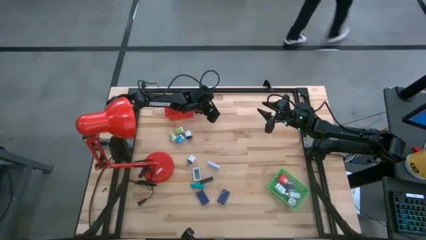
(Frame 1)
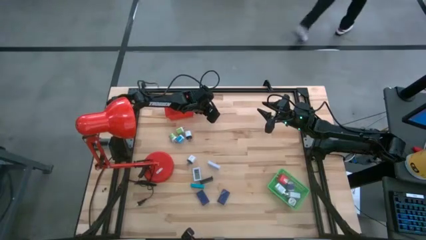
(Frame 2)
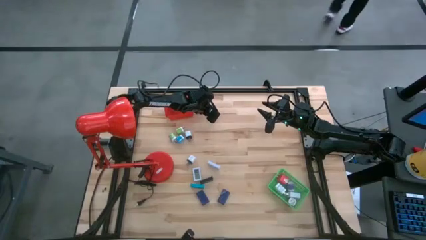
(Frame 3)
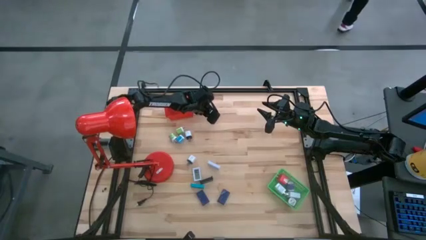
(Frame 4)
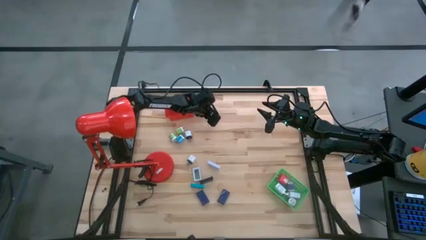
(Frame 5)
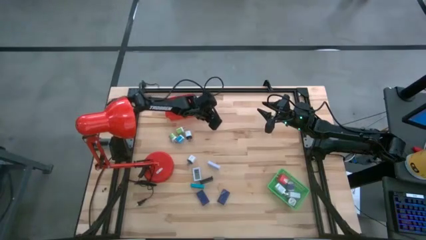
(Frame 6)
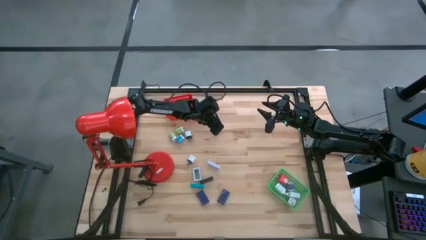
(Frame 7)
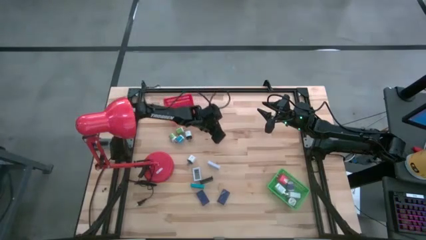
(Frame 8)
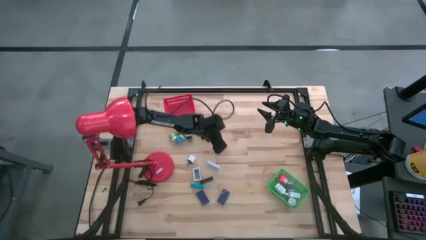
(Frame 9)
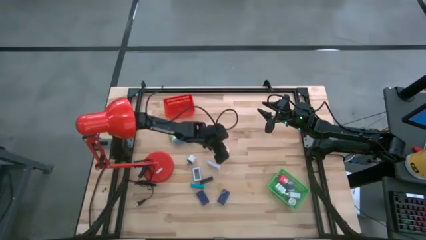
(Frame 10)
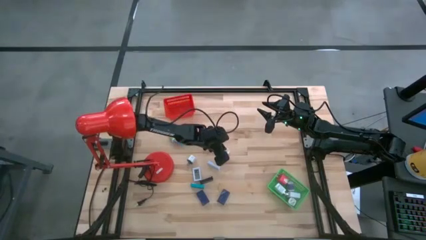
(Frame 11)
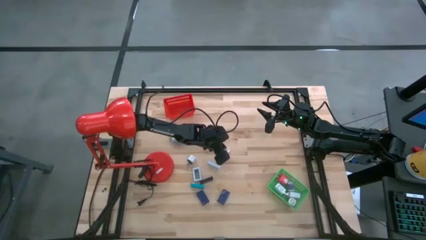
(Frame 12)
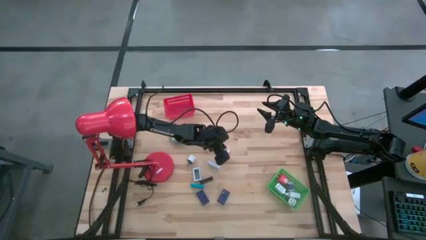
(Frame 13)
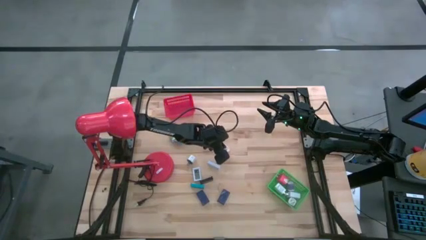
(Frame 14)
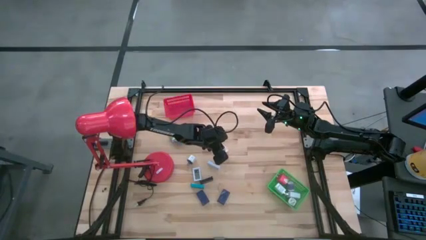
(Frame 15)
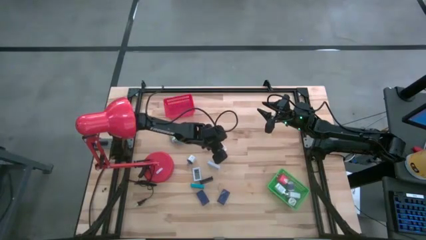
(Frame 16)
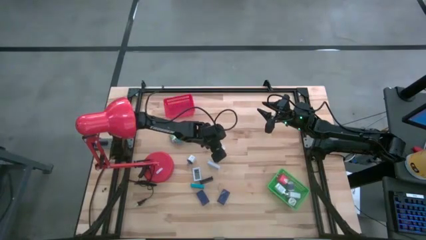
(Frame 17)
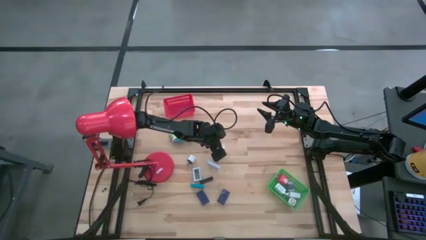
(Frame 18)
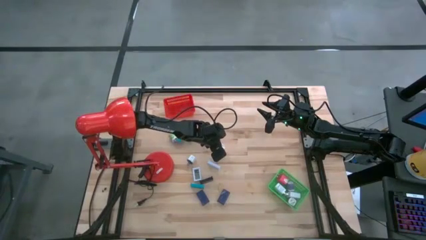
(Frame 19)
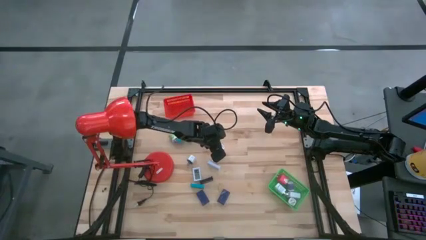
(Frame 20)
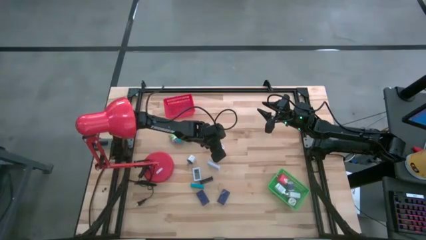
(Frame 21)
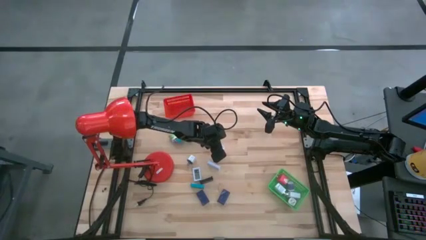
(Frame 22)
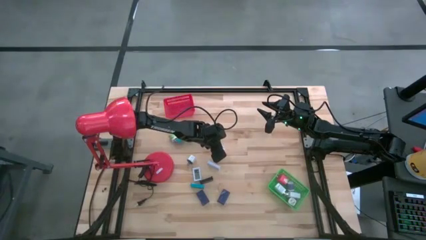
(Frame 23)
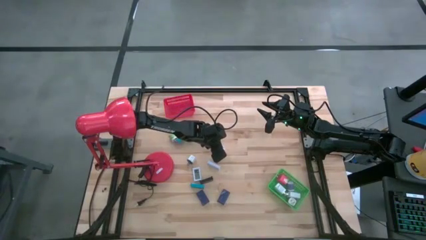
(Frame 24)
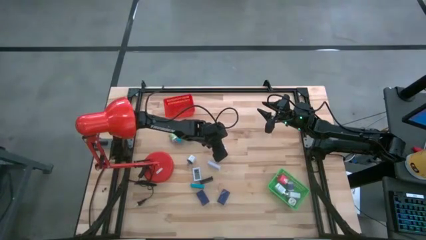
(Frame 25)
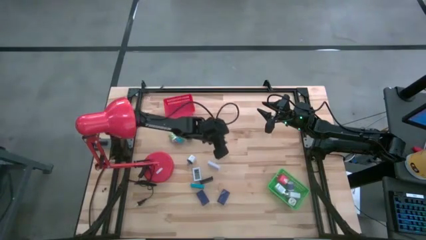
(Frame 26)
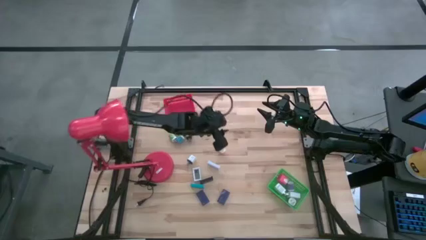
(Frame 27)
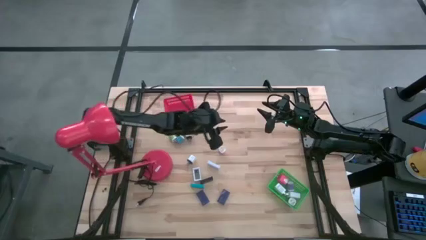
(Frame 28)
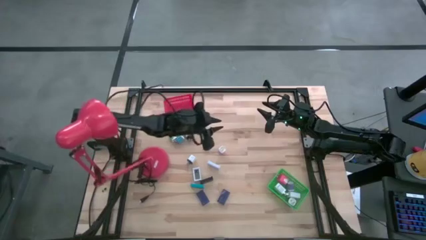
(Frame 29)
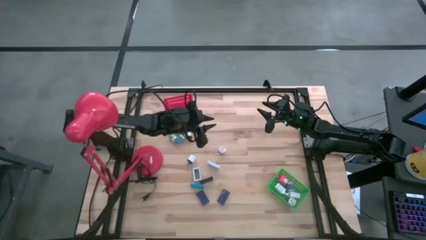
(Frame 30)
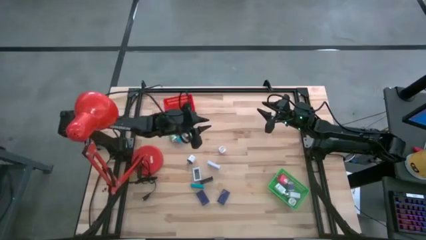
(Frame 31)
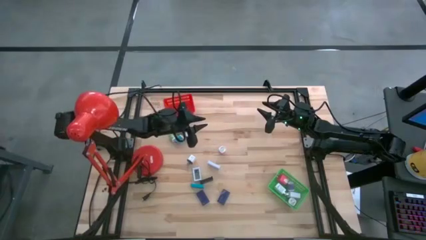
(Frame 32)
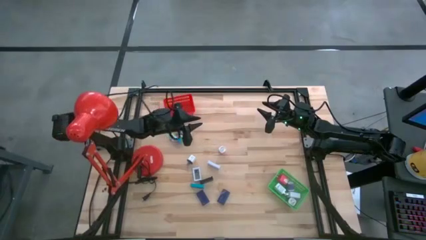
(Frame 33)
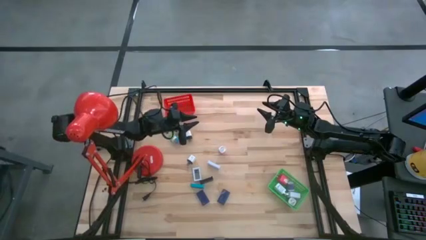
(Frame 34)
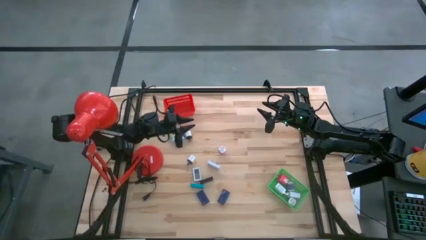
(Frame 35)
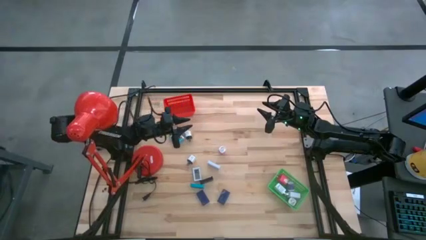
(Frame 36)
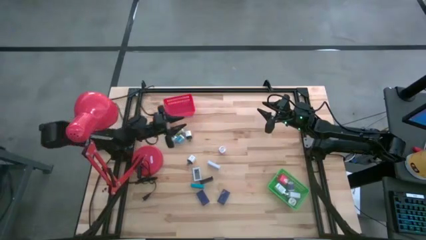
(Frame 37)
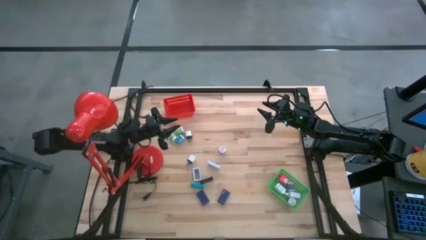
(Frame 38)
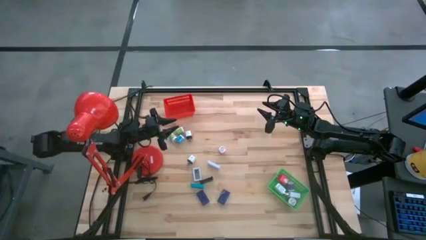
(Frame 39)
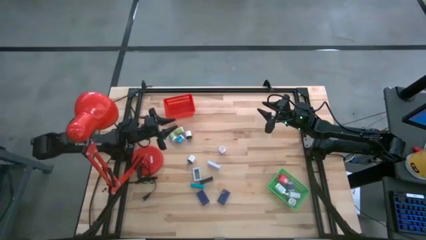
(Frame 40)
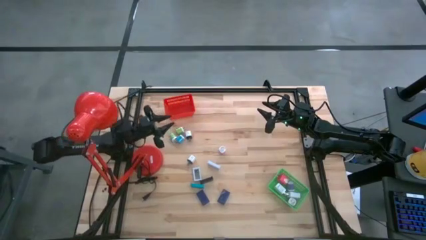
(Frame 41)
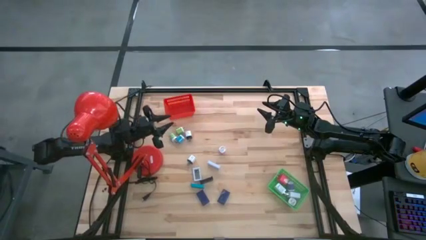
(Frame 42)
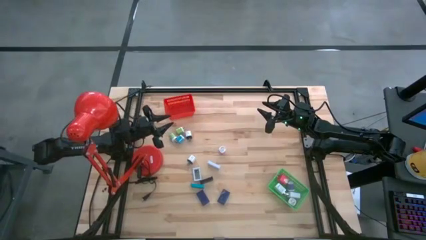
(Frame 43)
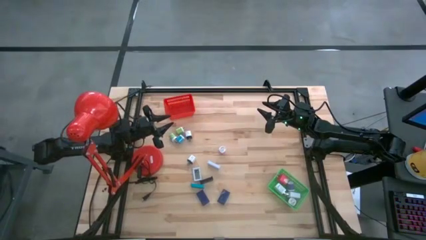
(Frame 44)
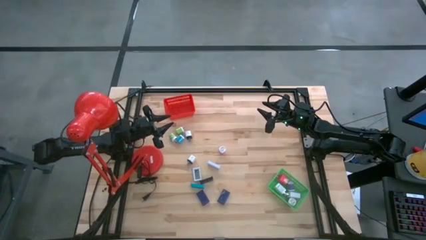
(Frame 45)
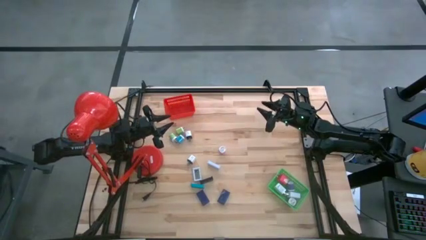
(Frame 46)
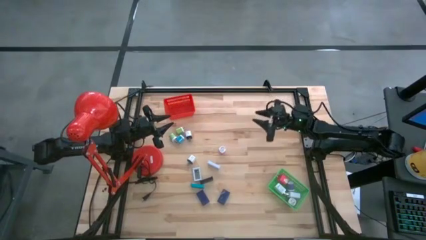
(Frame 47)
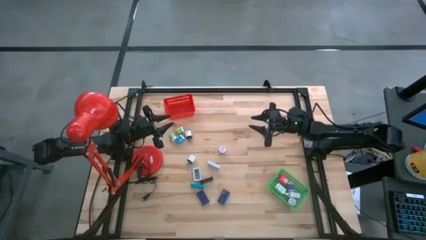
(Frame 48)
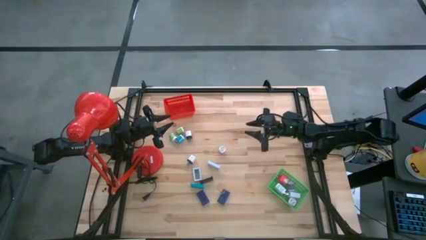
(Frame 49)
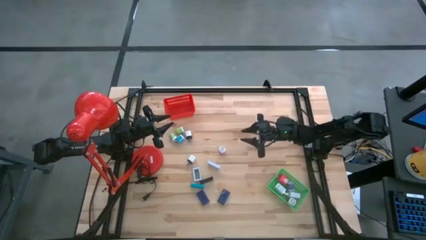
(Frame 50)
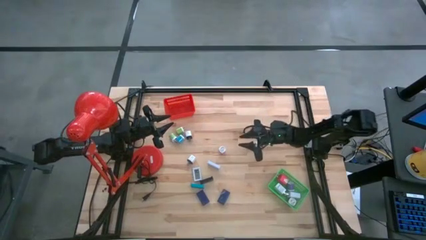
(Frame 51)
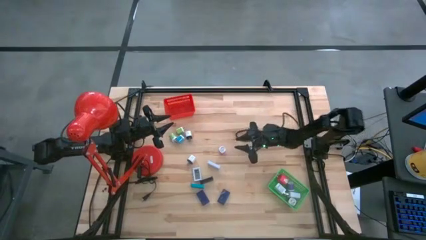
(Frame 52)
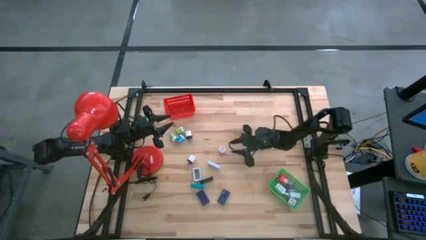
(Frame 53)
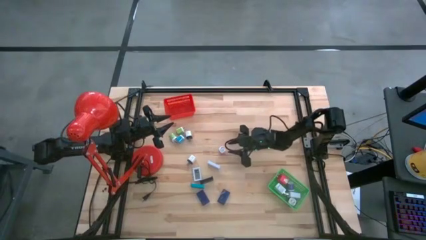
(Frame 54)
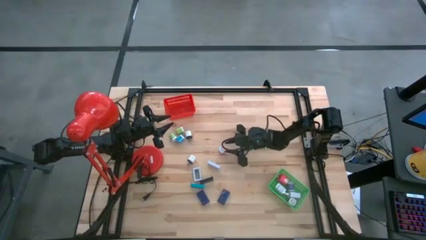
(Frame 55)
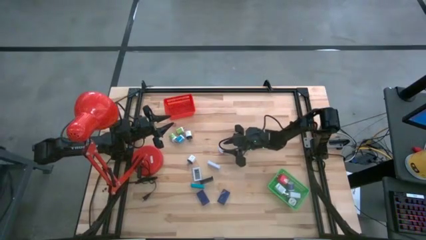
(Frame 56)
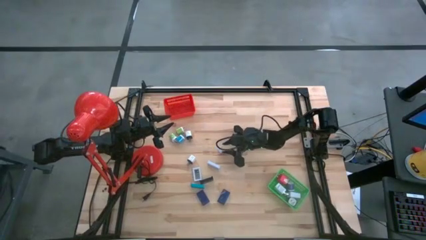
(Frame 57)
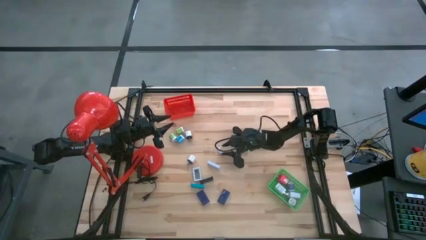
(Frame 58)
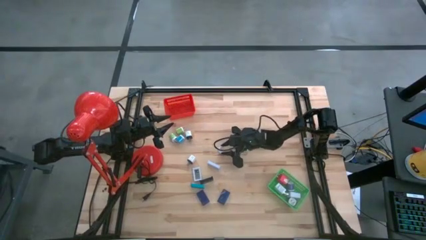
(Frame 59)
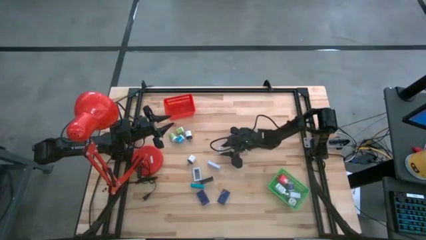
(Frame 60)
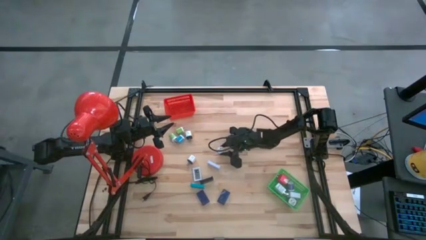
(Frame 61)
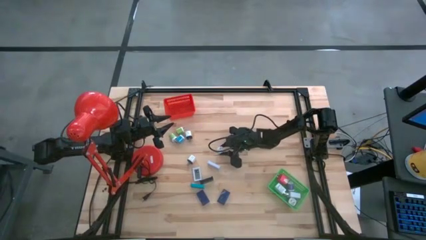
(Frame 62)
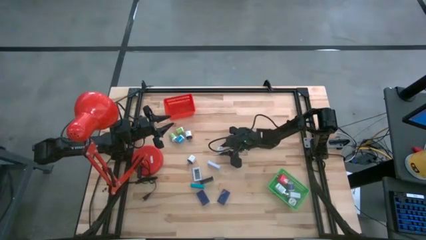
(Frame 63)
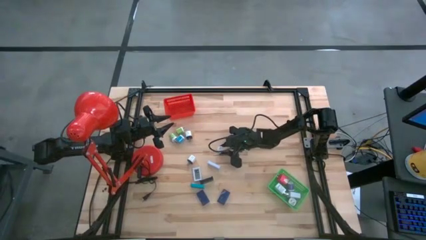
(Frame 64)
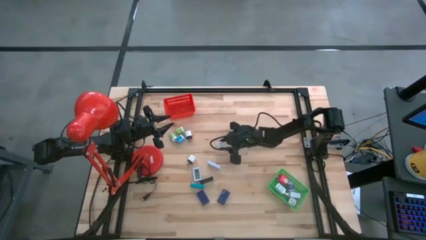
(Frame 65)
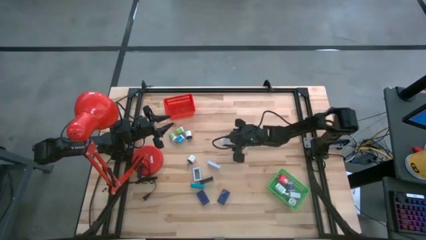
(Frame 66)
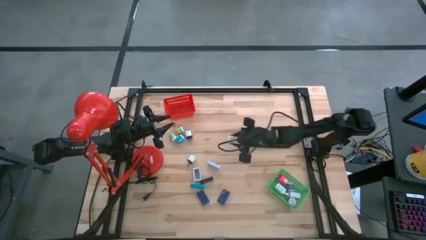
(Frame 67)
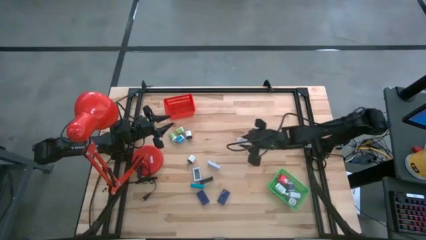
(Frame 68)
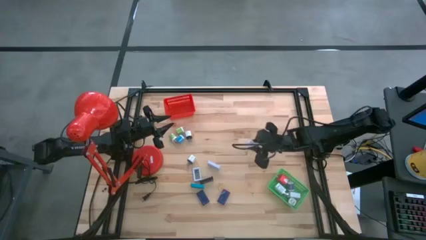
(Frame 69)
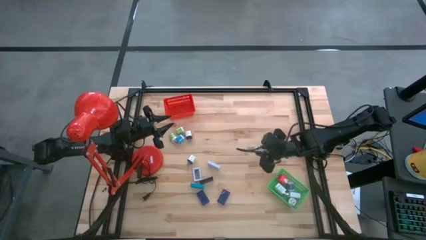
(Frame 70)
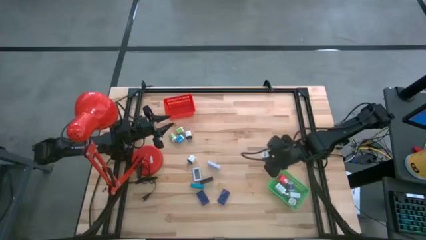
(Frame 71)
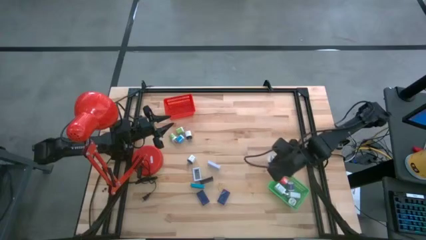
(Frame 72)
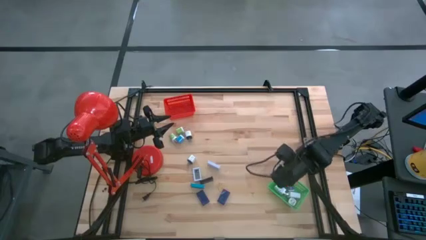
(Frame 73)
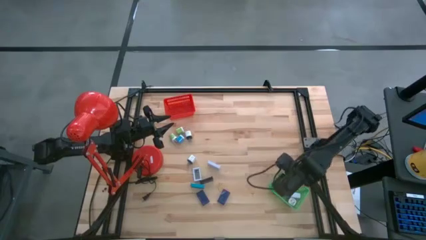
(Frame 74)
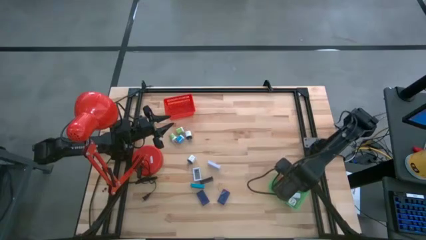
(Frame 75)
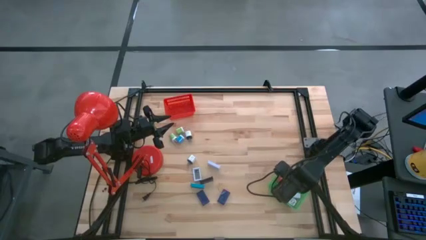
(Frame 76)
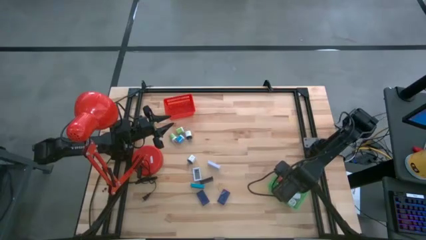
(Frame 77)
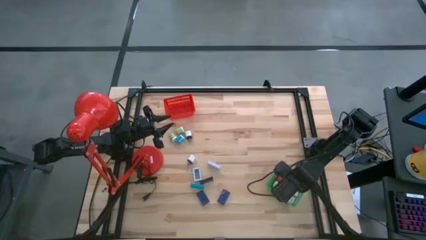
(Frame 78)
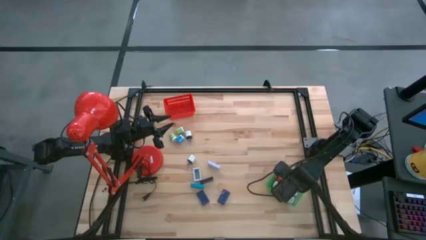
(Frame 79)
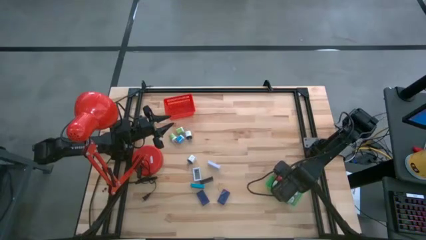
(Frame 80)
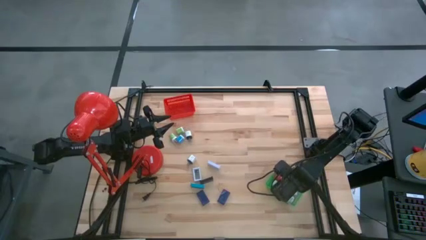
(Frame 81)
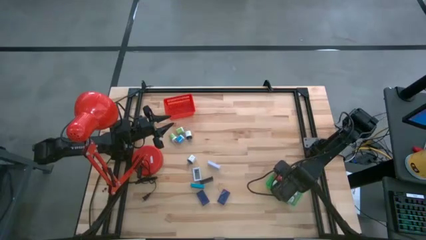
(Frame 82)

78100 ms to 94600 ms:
Task: Pick & Place Office items
Put the pink white charger adapter into the green bin
